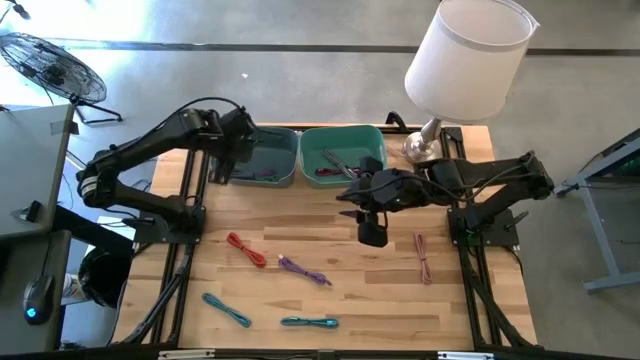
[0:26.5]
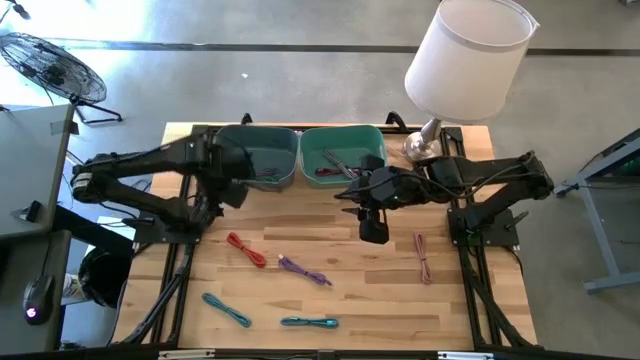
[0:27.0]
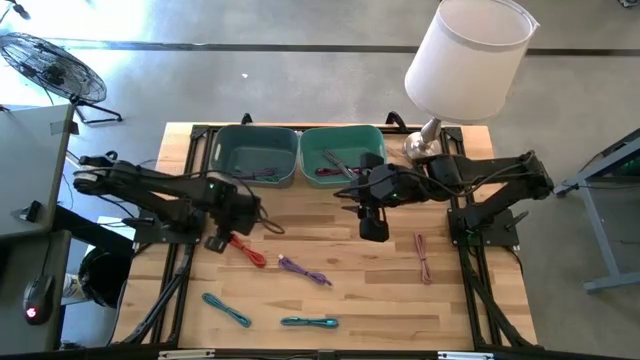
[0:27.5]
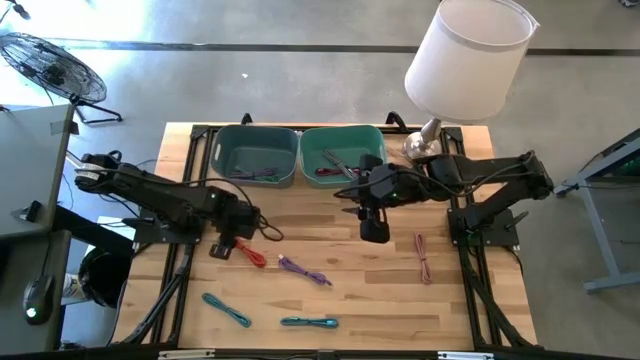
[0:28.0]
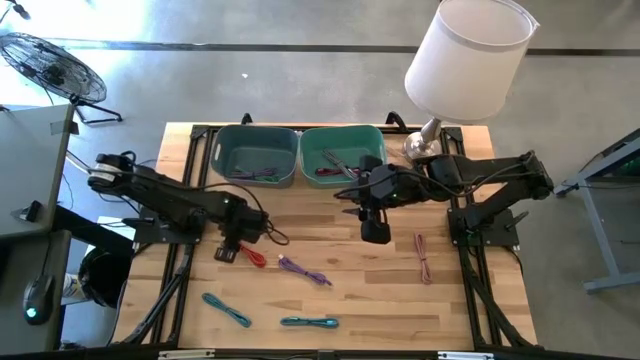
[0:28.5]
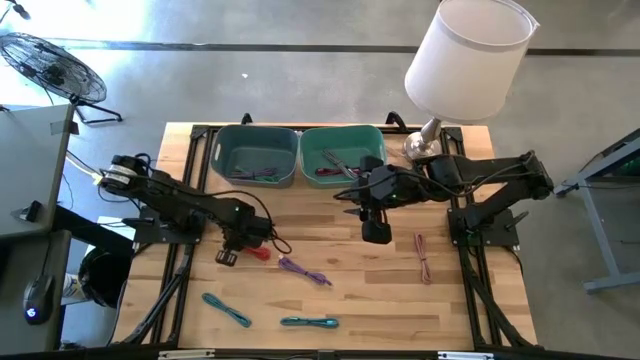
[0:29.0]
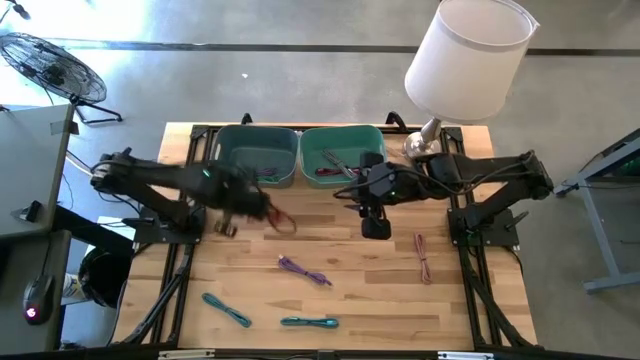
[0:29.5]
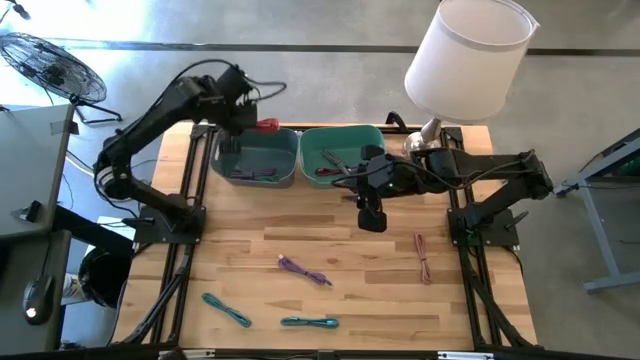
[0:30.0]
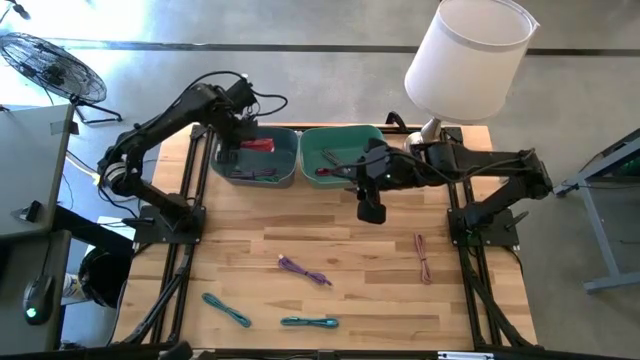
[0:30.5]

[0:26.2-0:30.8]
Task: Pick & Place USB Port
Put the orange charger cable into the blue bin

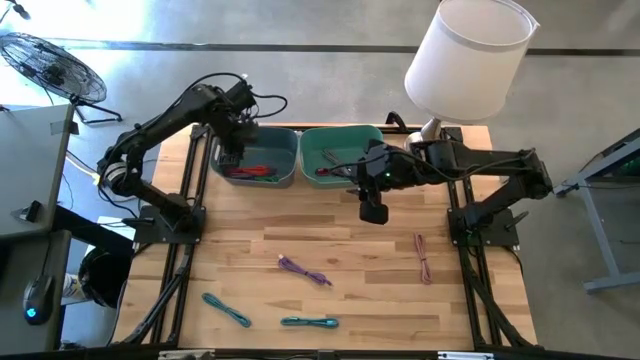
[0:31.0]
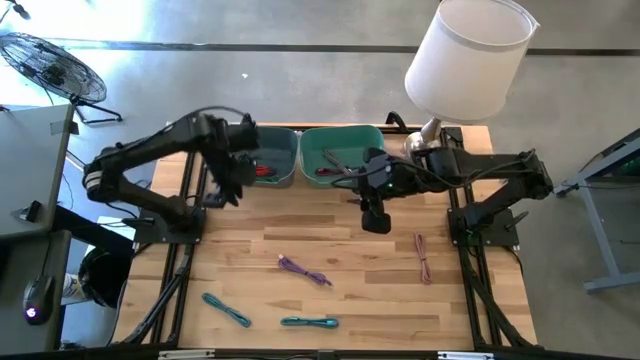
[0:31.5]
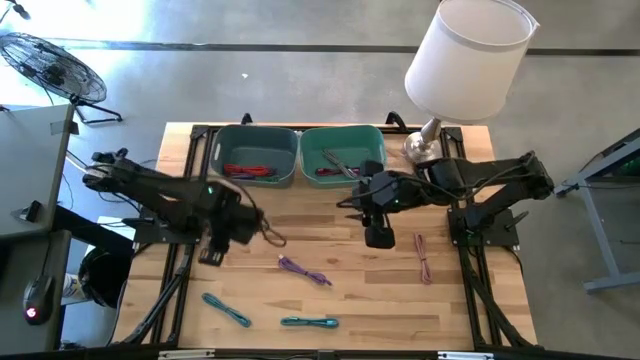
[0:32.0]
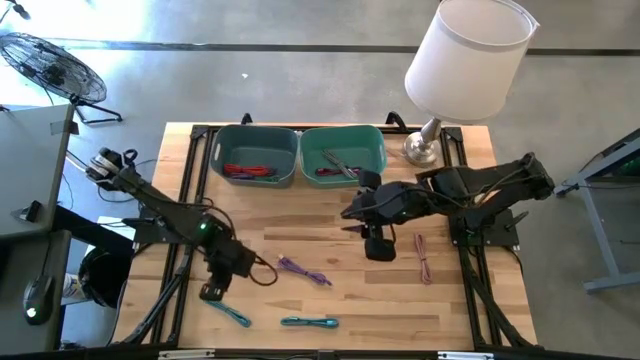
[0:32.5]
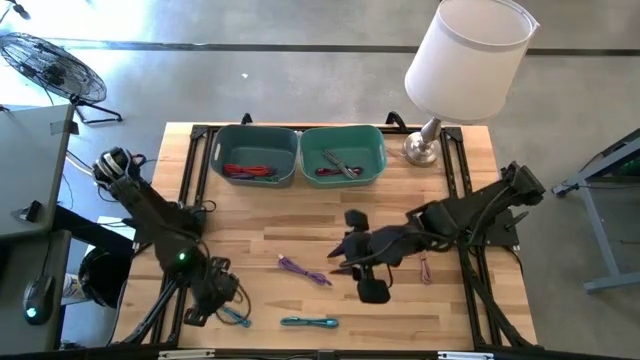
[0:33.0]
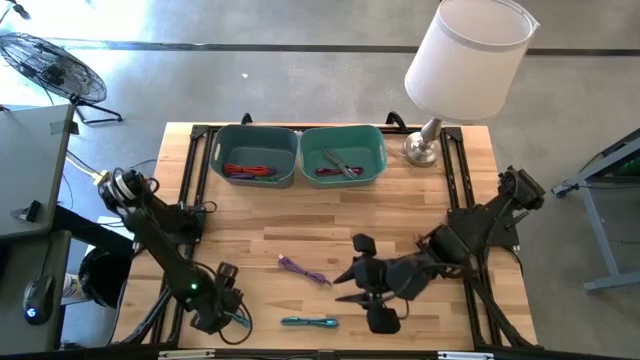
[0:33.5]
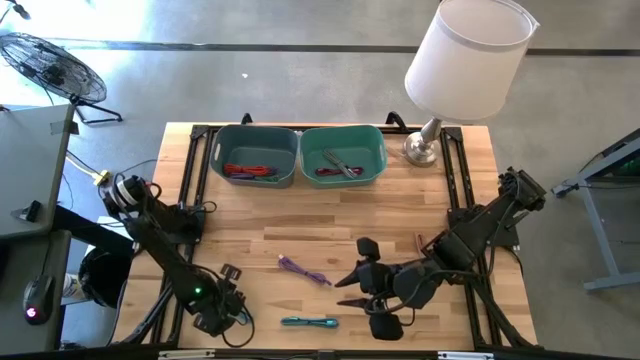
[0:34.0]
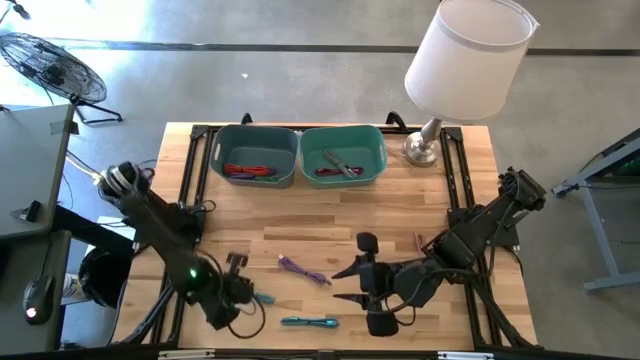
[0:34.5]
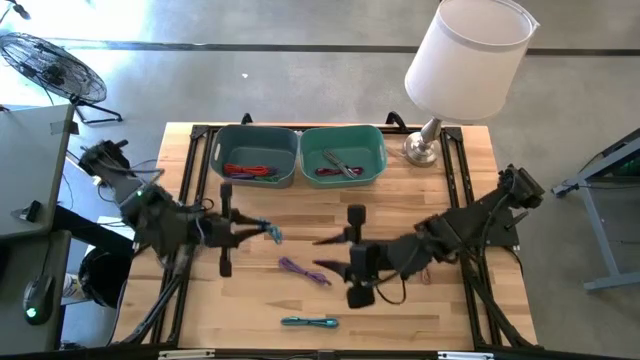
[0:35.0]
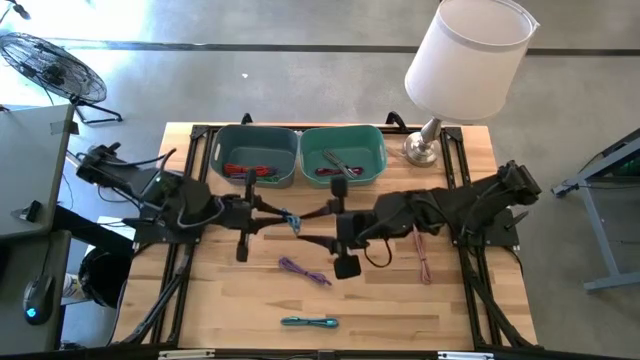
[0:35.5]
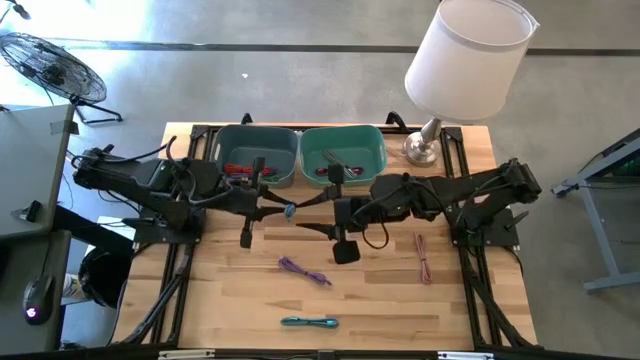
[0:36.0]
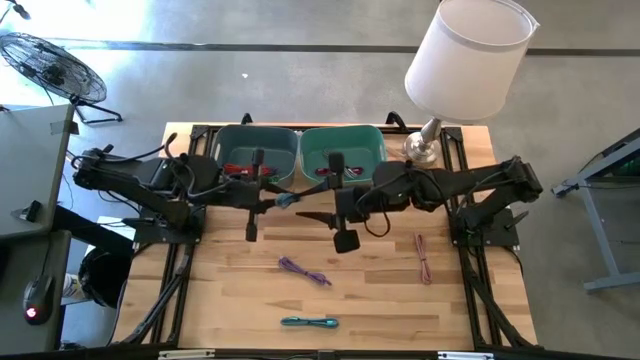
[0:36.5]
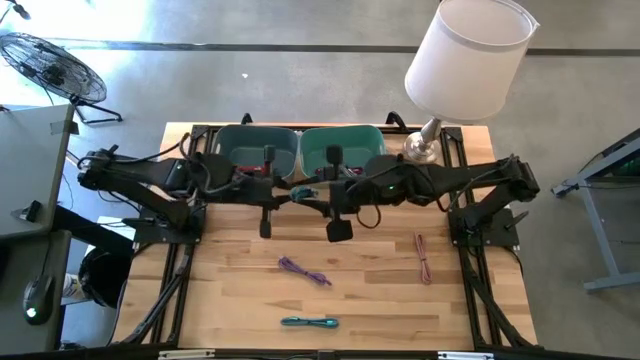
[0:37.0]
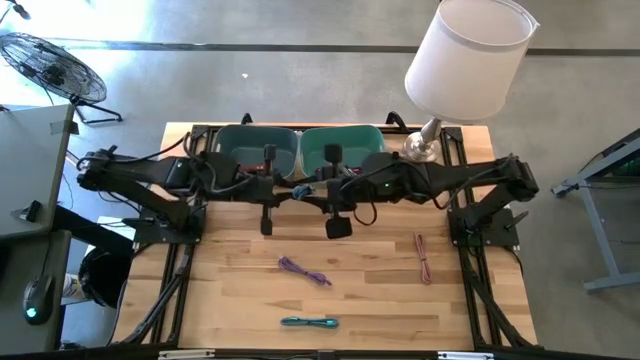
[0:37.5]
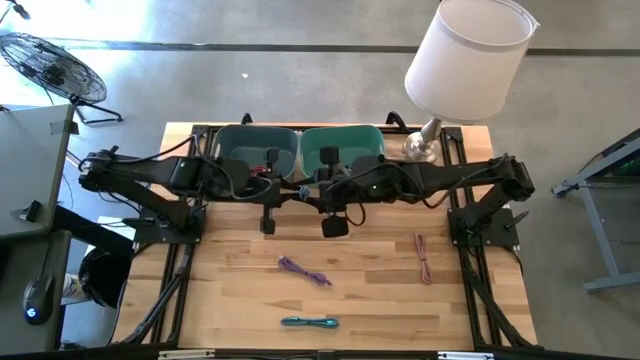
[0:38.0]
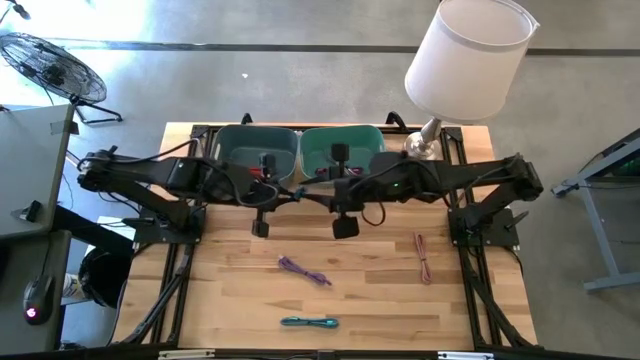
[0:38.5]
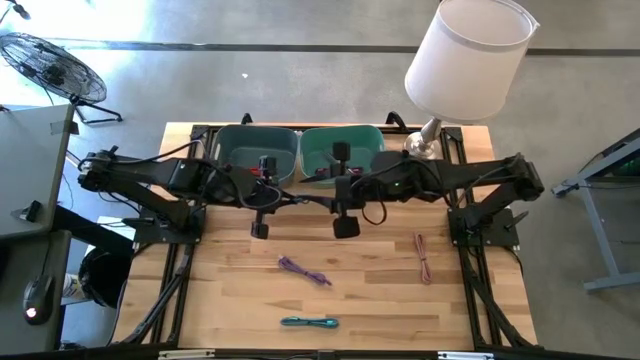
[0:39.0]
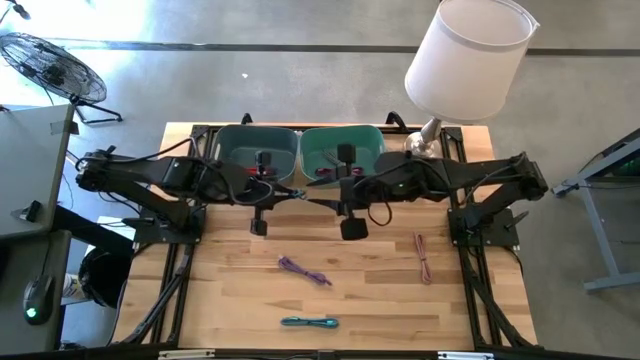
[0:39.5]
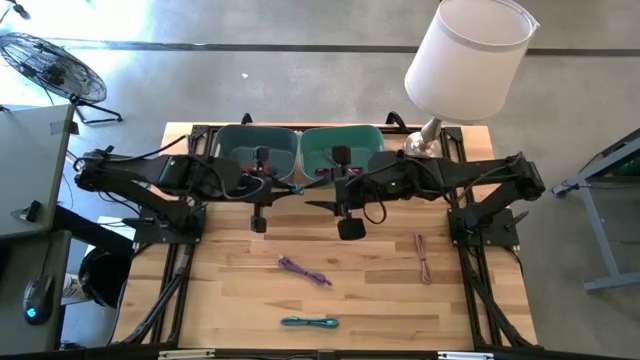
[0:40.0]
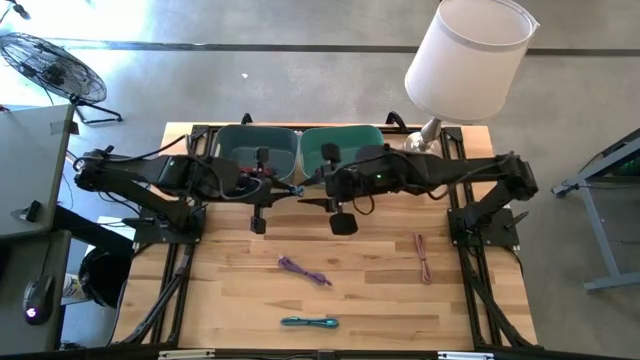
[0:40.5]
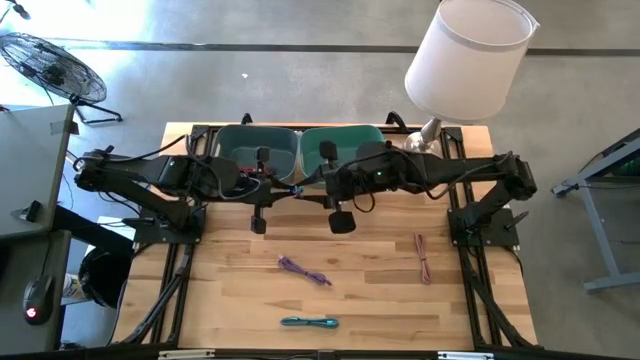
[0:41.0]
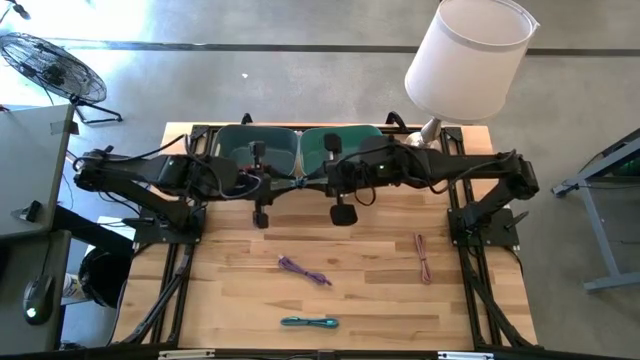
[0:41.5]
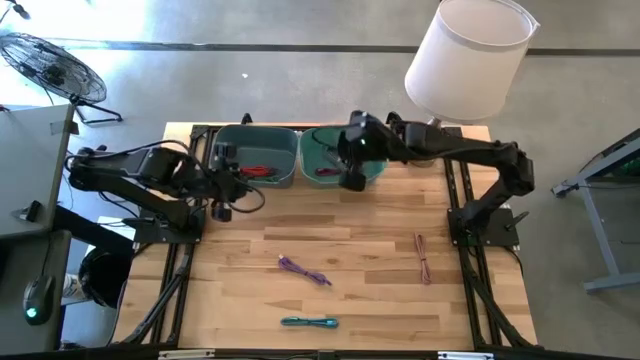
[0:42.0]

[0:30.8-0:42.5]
Put the black and blue charger cable into the green bin

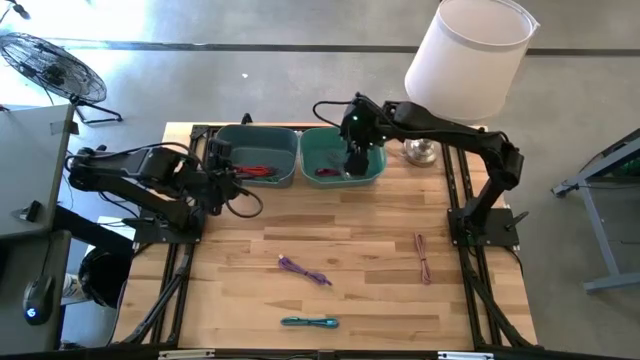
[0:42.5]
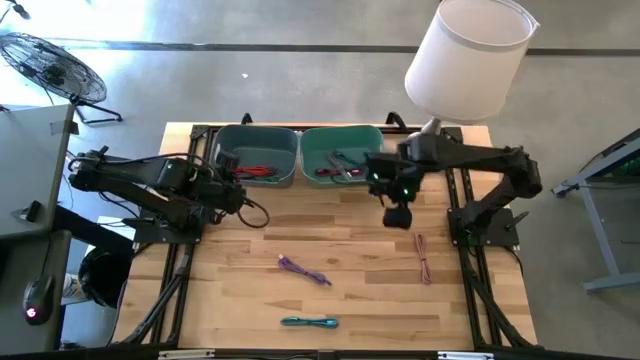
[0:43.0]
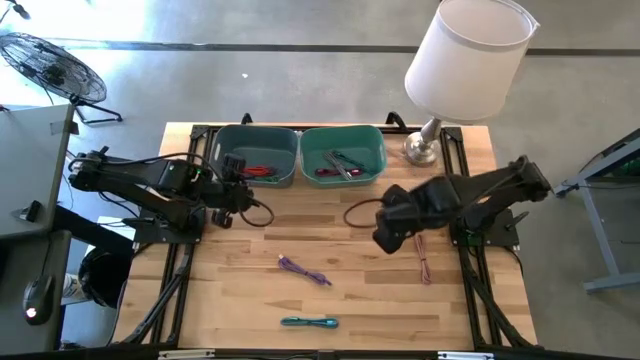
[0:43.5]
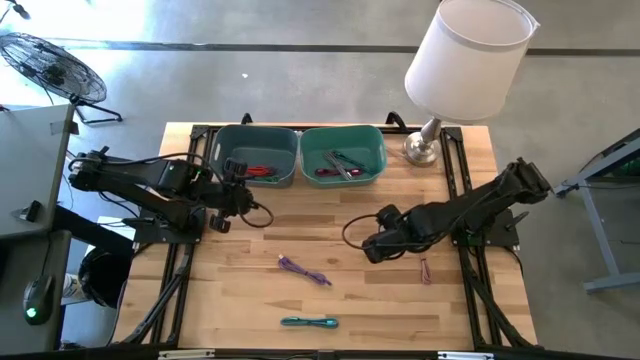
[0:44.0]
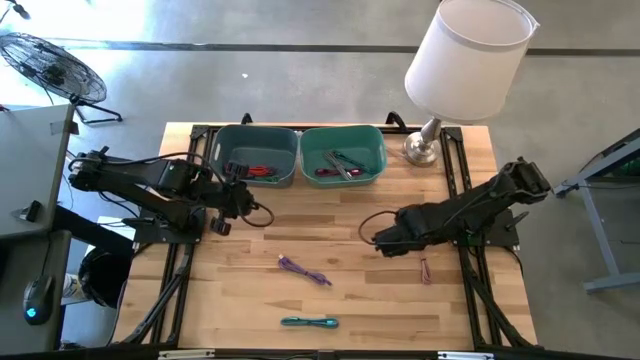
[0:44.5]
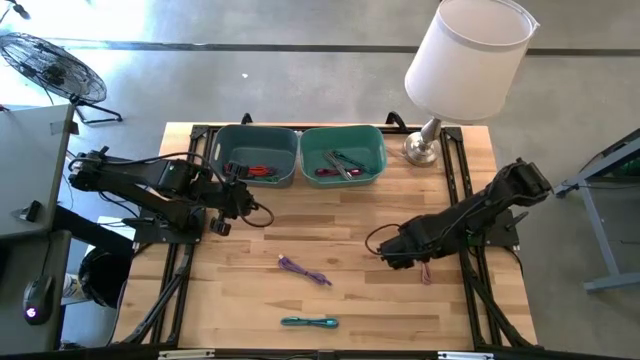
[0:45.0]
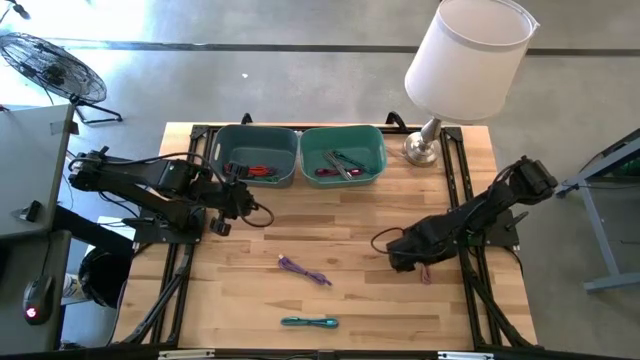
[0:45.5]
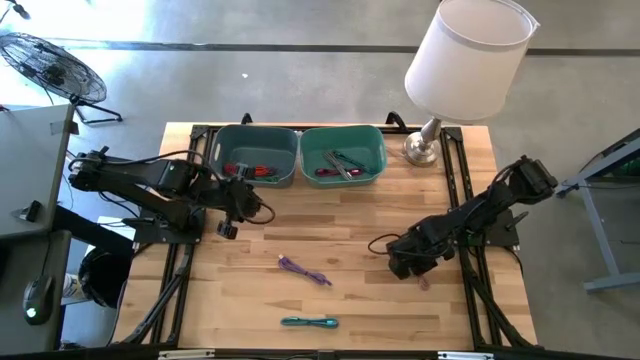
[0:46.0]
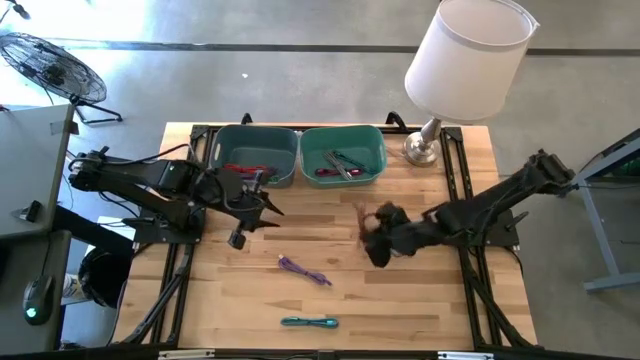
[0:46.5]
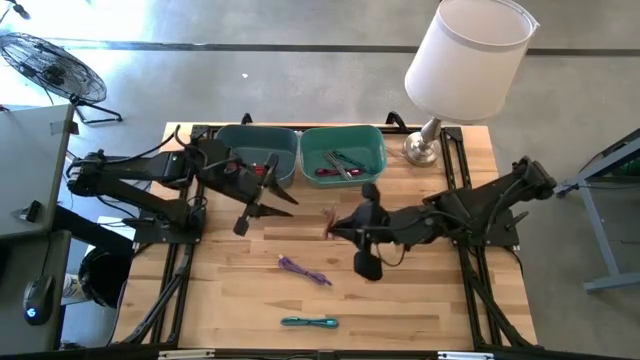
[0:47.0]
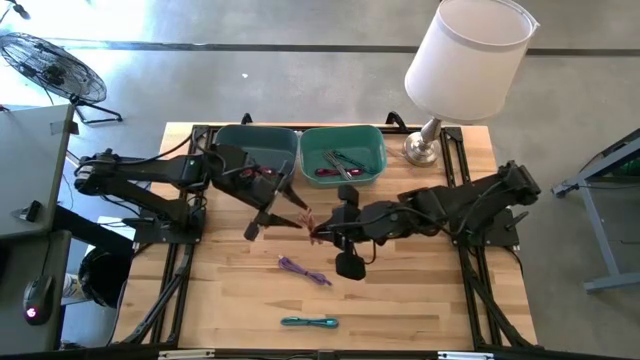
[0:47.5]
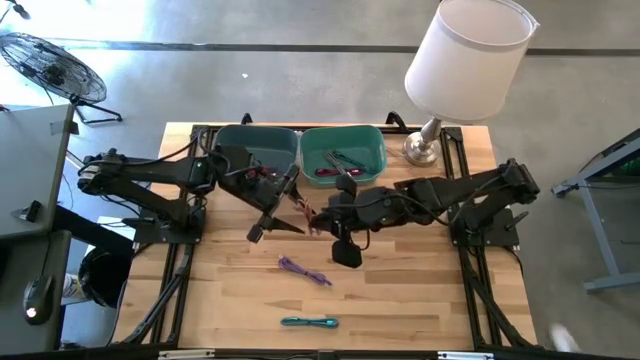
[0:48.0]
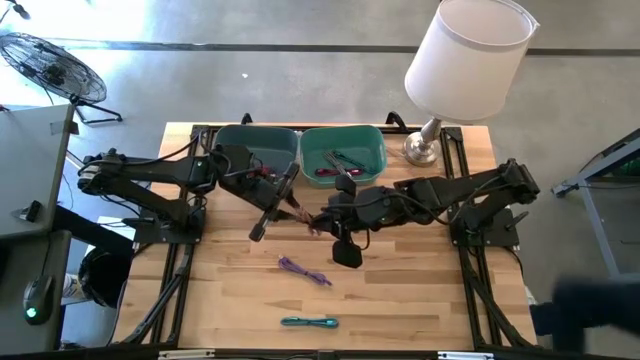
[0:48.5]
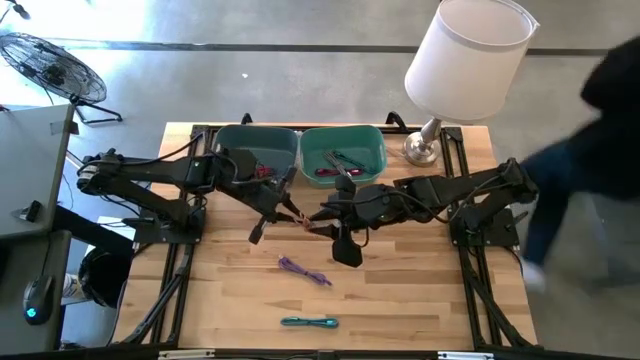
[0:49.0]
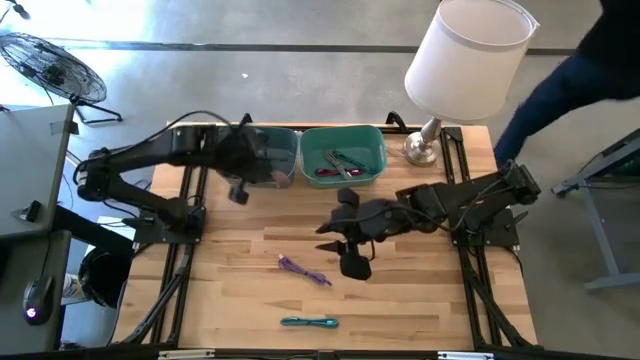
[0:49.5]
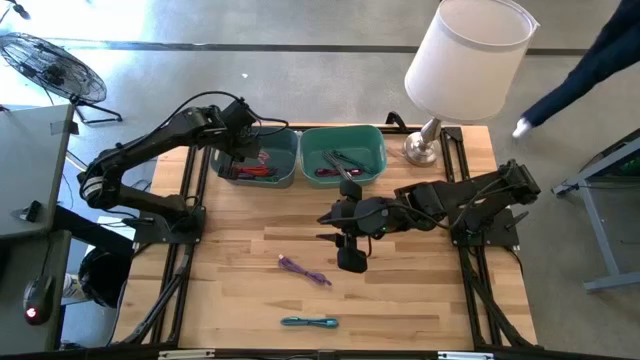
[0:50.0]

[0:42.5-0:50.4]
Put the pink charger cable into the blue bin
